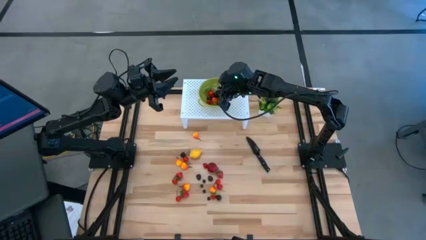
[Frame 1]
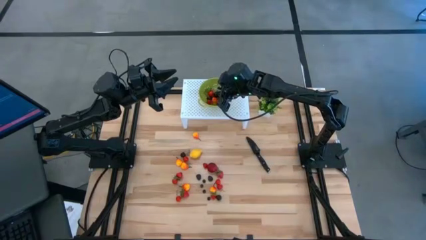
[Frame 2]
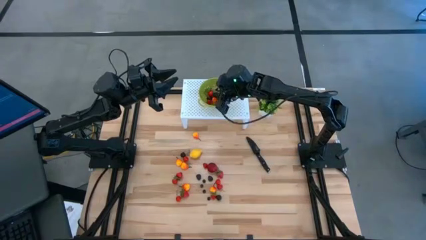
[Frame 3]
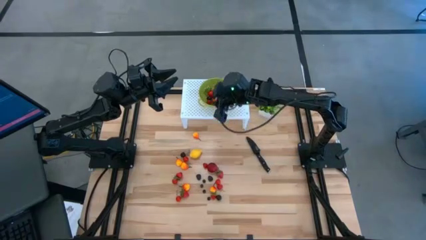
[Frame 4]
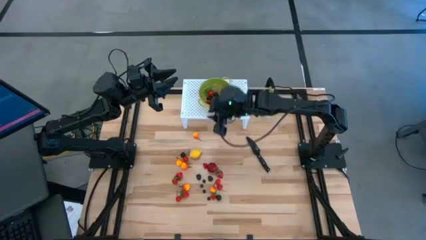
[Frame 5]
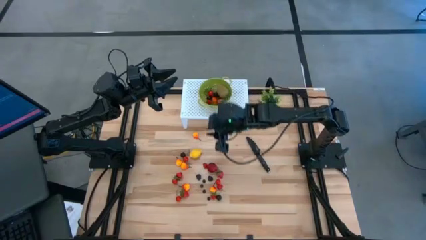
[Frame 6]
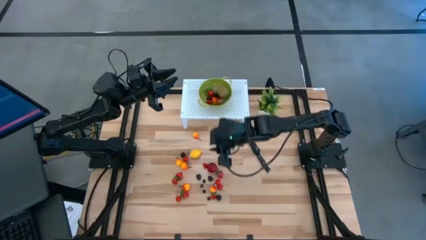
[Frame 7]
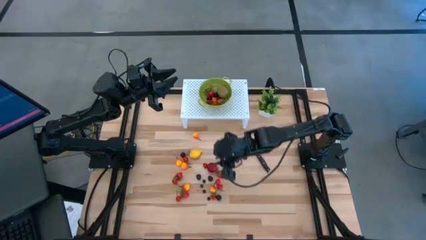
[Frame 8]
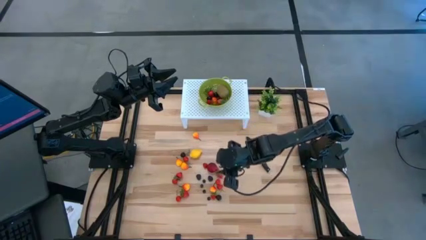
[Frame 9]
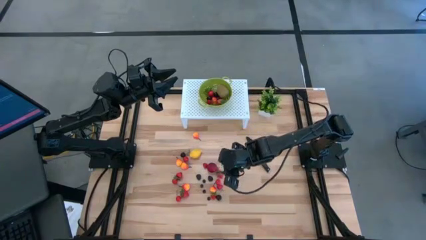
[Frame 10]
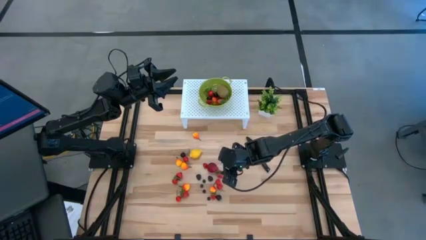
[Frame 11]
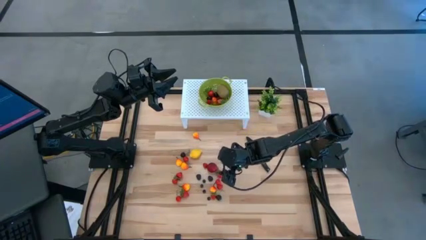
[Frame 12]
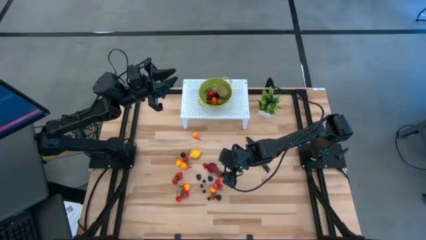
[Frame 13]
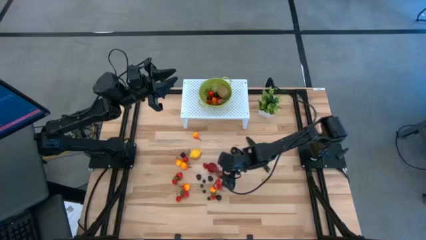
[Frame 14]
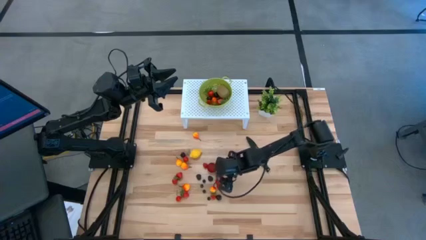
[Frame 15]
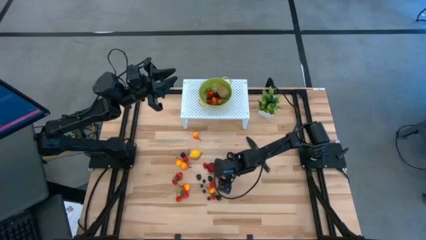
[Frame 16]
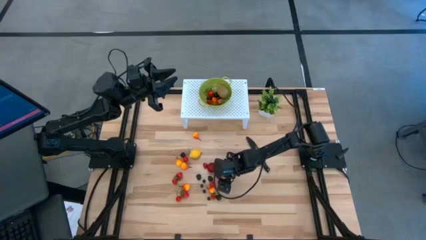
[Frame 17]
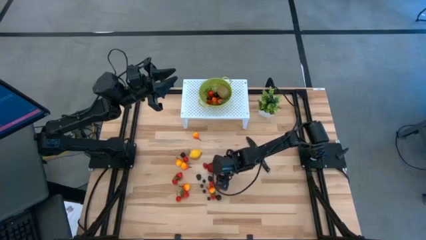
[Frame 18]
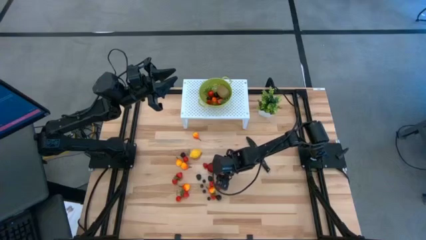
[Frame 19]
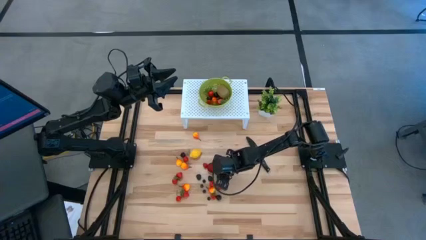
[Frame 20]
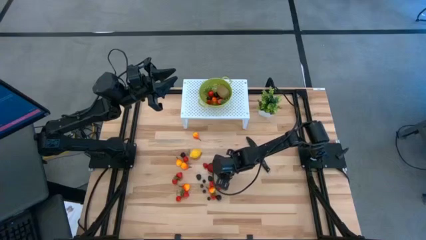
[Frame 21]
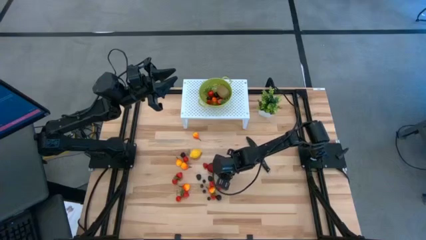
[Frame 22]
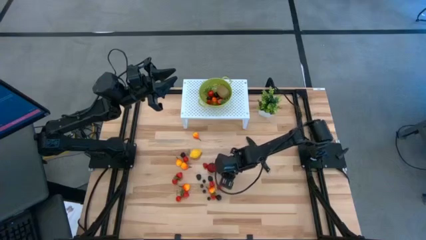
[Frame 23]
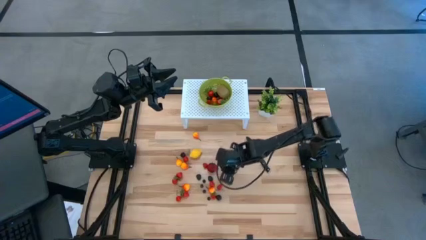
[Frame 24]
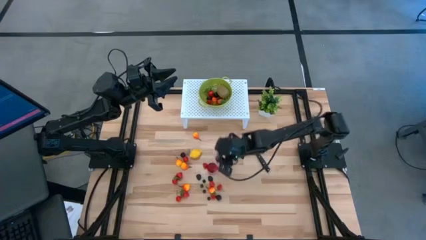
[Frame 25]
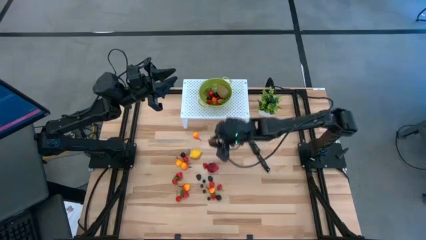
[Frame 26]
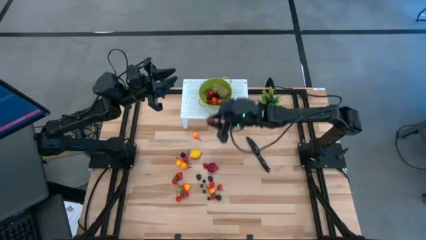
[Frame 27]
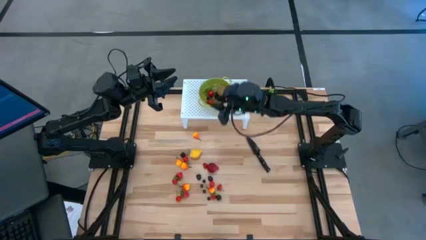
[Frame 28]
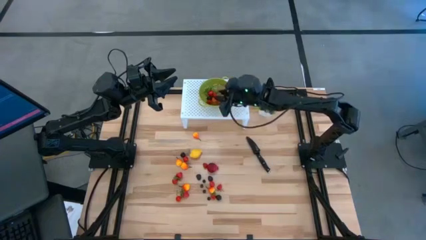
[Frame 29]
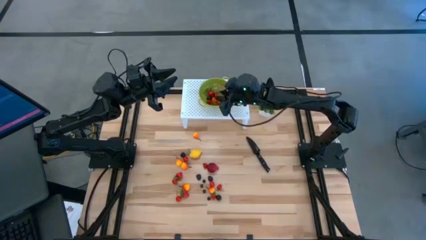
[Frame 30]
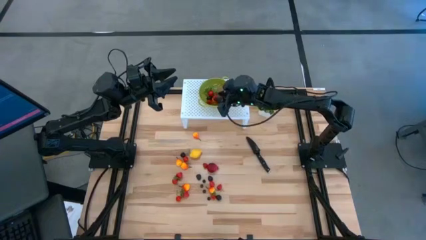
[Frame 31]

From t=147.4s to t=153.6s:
Task: Pick & Place Fruit
Put the red strawberry into the green strainer bowl

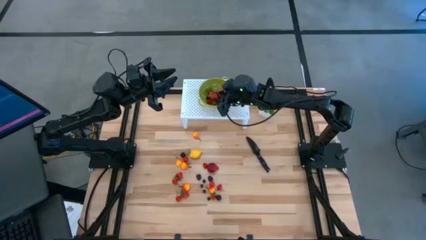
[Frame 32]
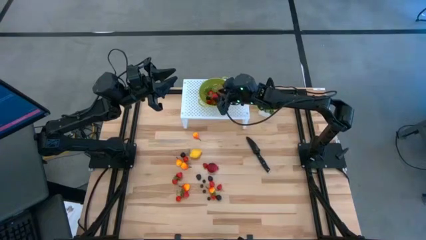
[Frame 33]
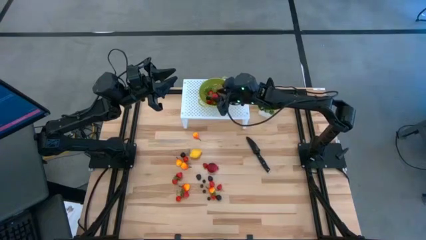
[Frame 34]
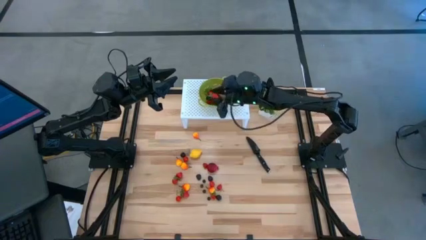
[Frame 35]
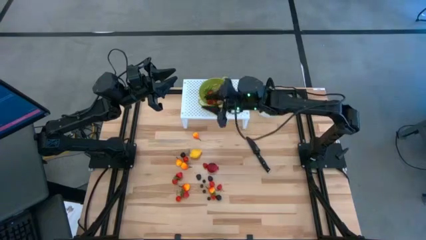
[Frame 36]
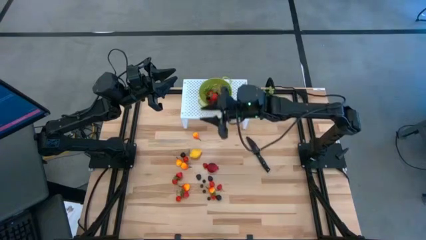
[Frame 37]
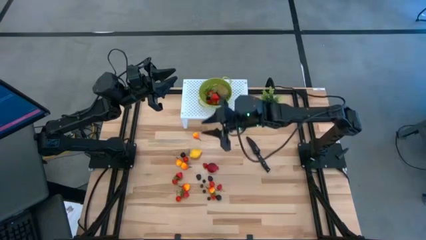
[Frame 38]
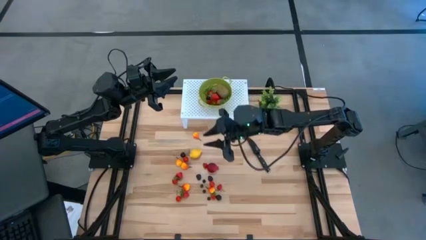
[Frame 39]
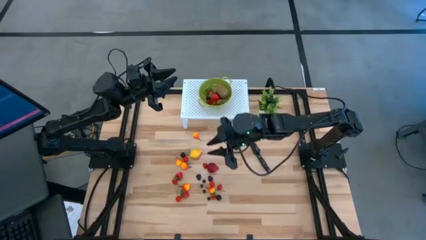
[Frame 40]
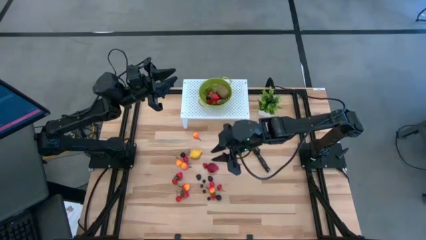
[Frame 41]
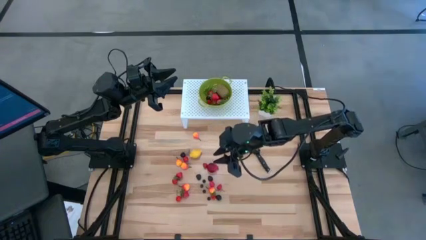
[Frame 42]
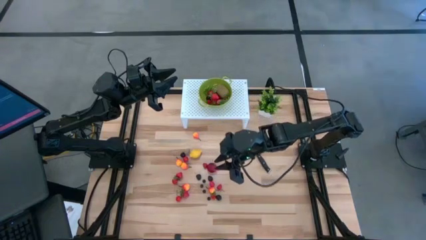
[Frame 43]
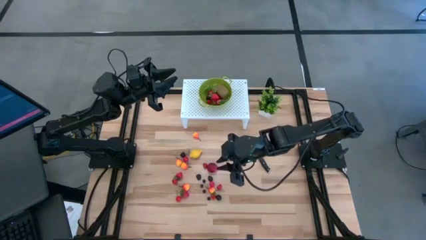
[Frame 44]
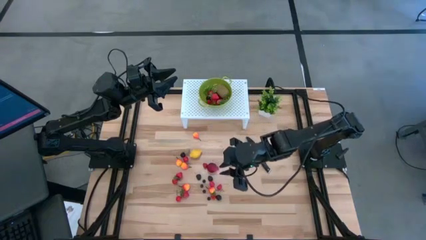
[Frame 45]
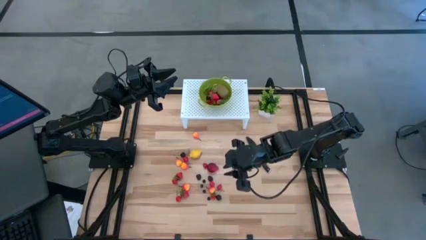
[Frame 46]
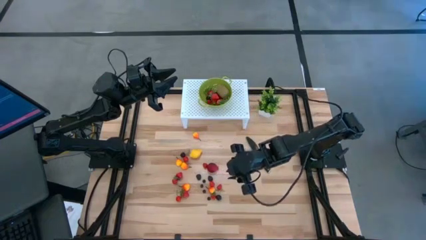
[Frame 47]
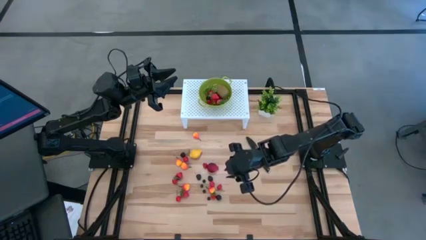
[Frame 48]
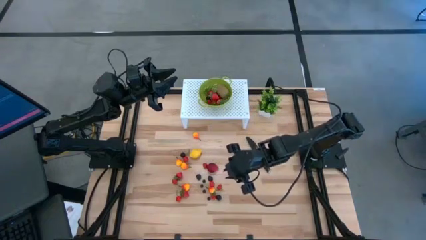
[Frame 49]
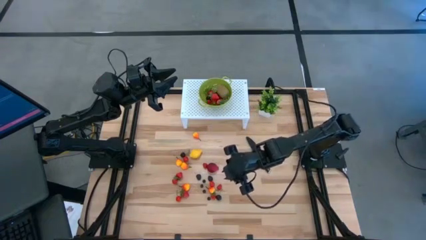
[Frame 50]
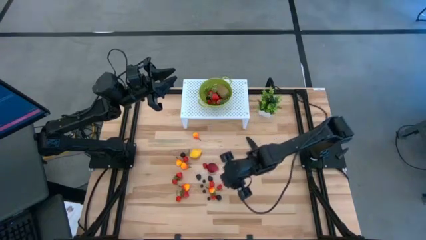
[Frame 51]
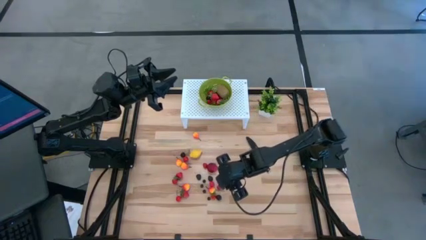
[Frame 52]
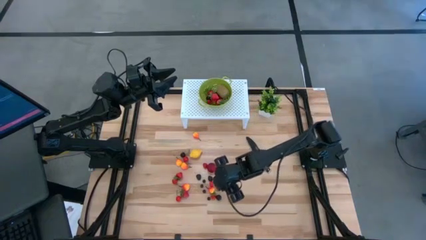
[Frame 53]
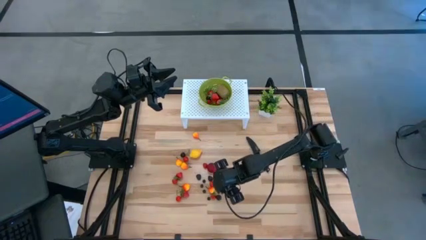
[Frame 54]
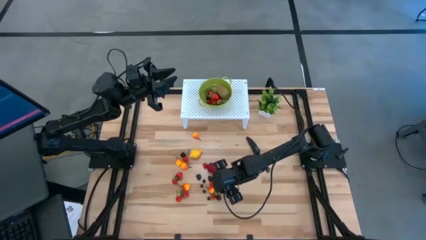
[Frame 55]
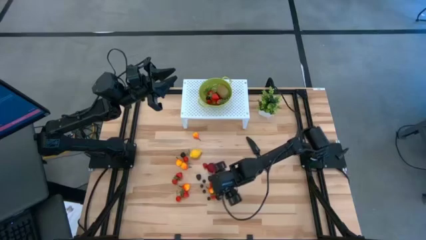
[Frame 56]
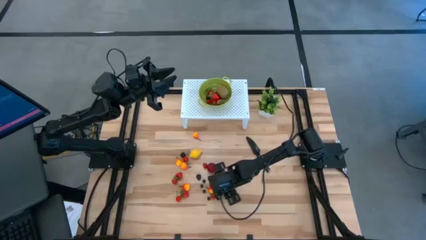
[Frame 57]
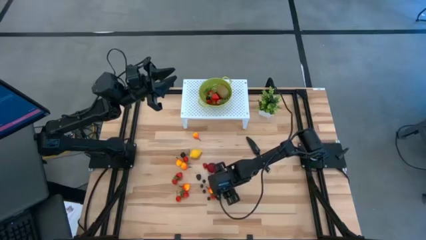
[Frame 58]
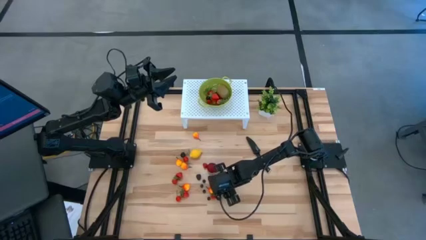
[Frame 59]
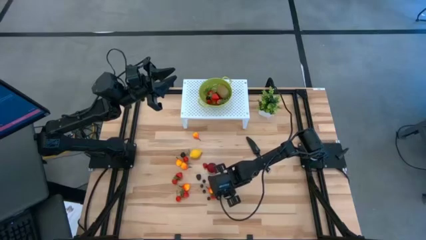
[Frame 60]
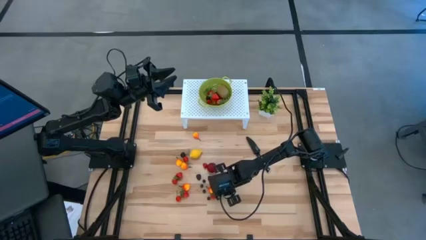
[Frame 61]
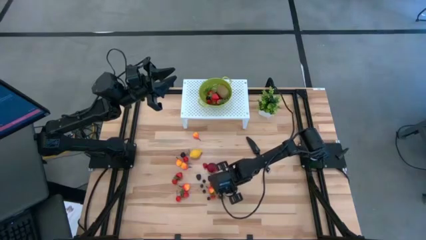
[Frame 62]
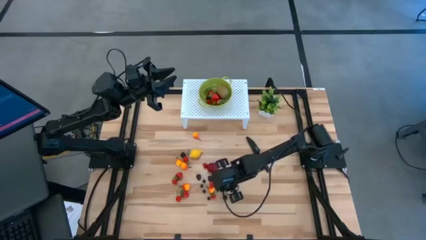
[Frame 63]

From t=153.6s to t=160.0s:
Put the red raspberry into the green strainer bowl

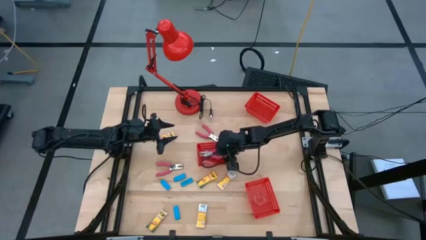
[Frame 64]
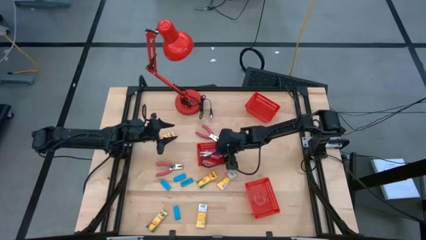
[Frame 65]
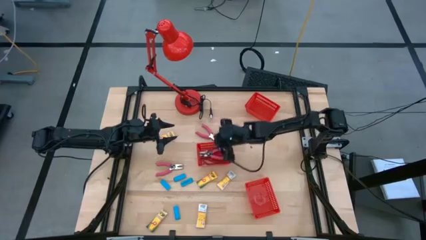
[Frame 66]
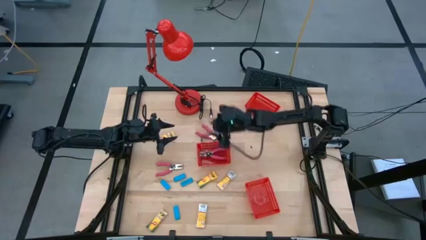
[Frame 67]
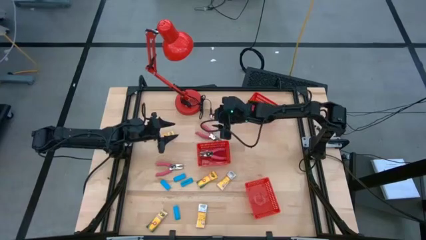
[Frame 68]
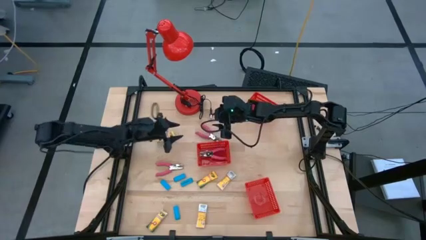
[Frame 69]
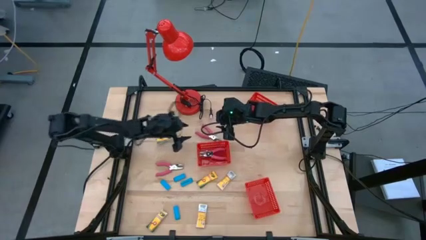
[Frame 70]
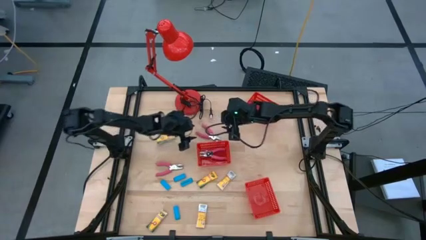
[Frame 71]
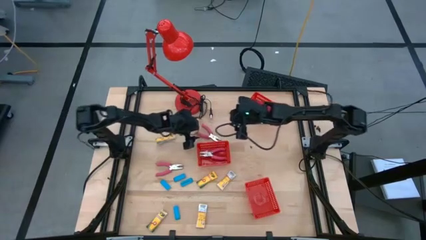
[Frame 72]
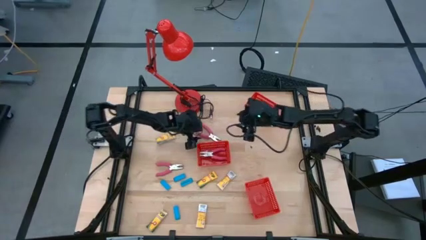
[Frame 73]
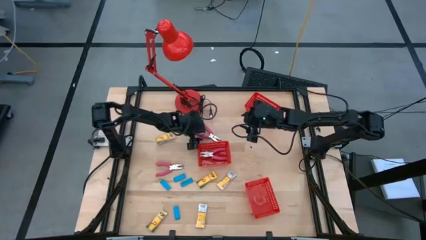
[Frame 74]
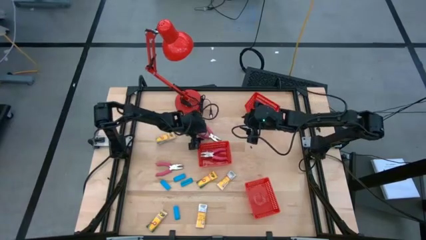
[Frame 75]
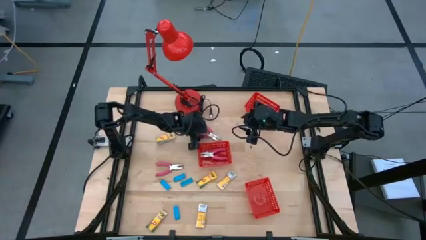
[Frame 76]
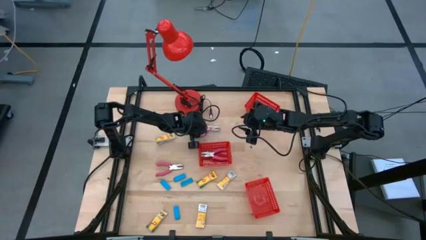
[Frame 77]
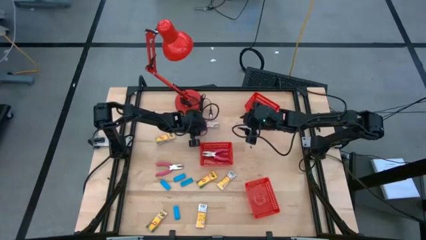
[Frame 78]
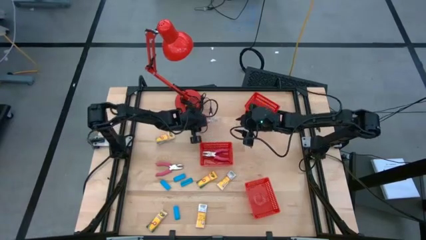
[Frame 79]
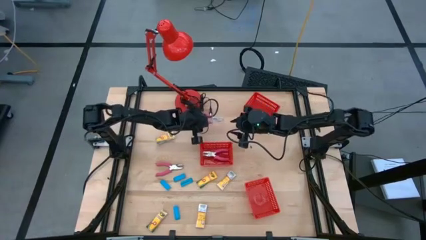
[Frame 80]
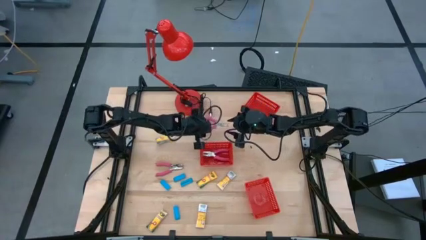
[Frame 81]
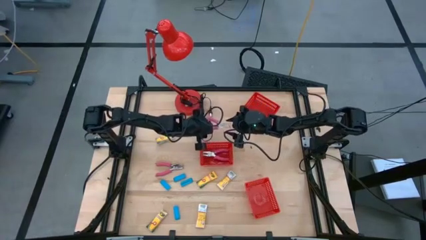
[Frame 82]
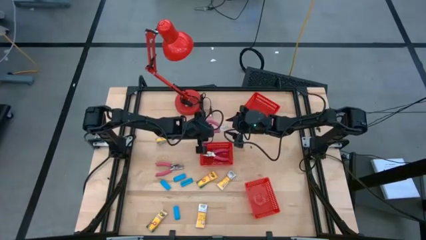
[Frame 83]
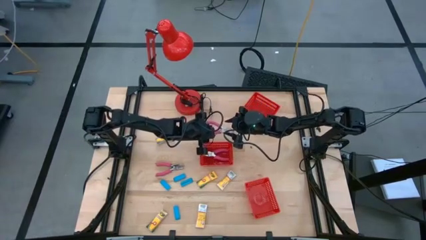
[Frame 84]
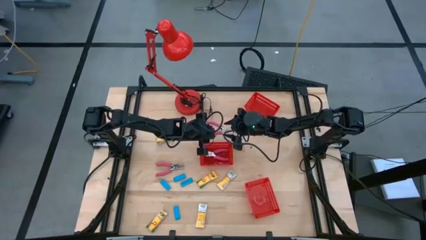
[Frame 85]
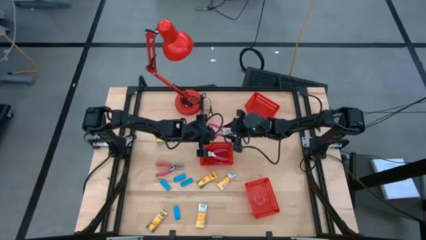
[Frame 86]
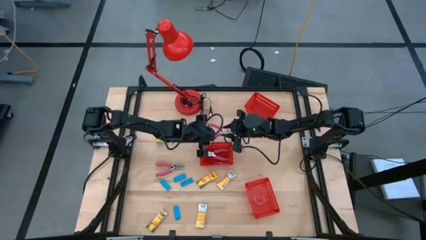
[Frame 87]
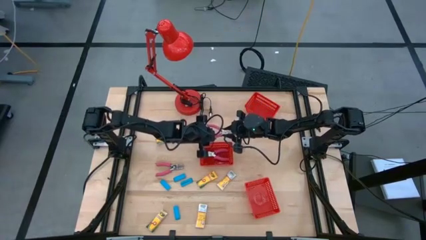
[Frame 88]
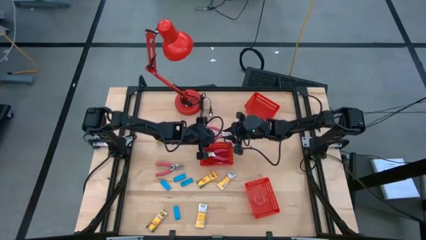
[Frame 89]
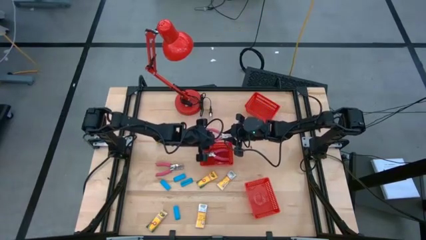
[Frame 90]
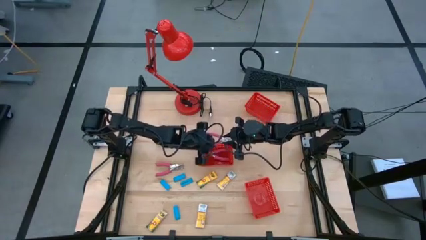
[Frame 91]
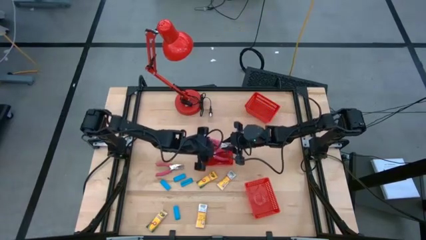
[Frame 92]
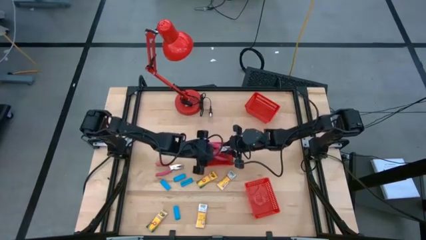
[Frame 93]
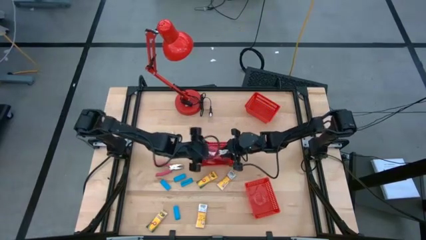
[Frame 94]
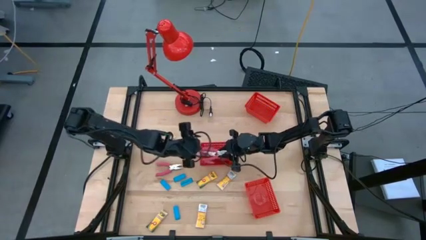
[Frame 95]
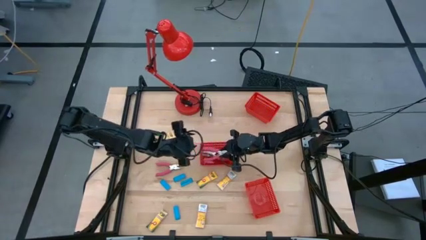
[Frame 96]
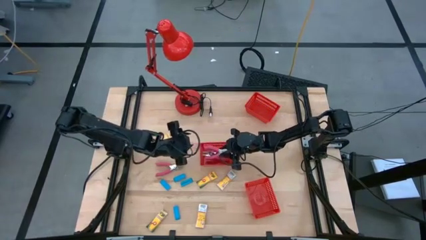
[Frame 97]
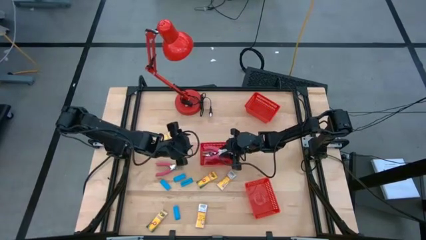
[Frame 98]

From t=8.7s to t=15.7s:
Task: Pick & Place School Supplies
Put the pink hole puncher into the middle red bin
